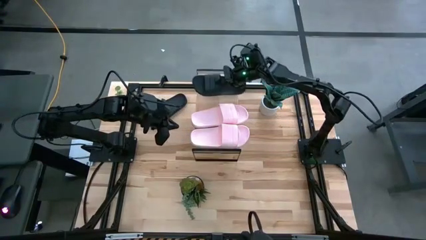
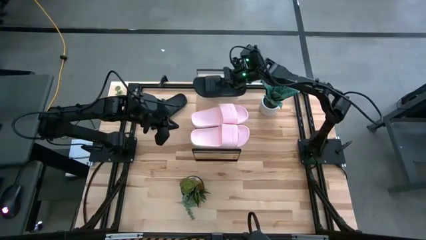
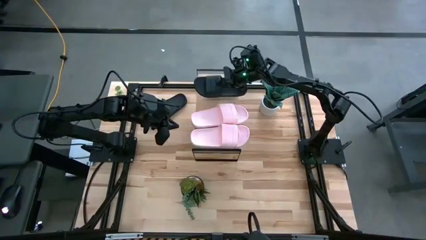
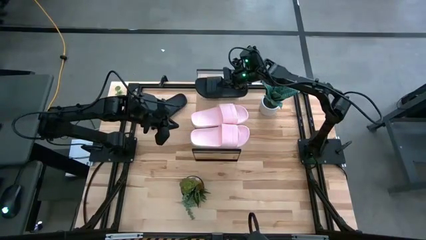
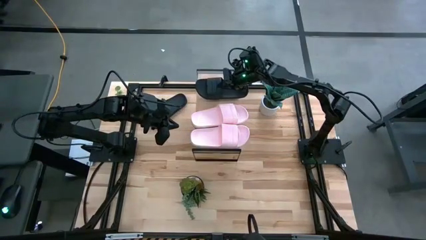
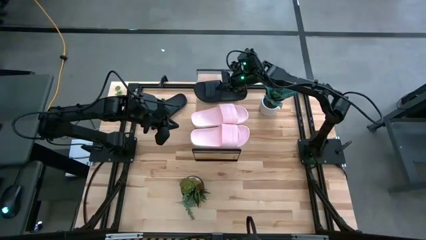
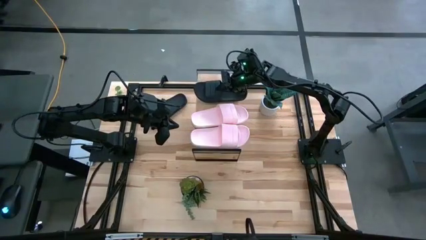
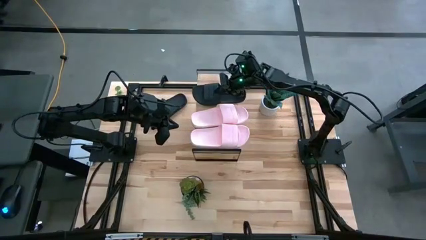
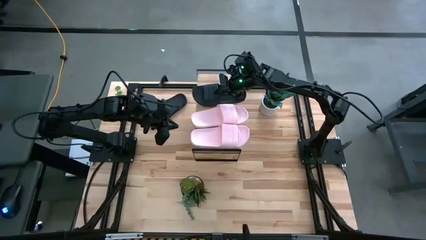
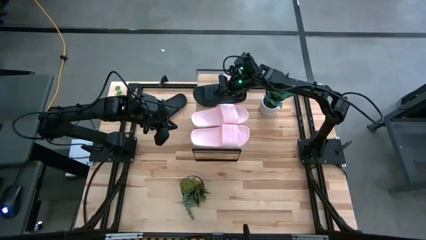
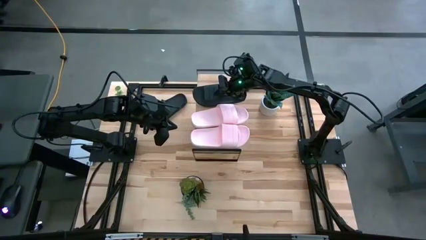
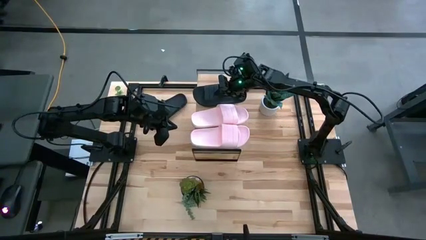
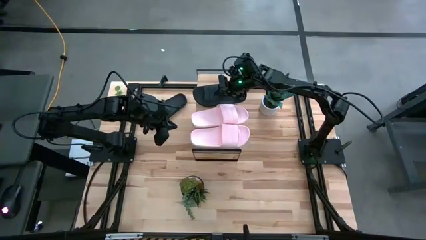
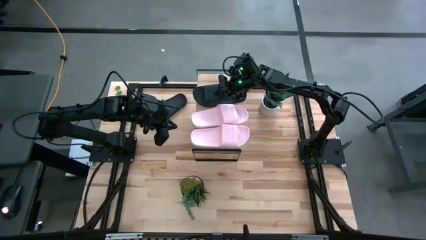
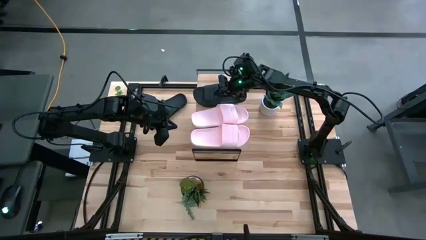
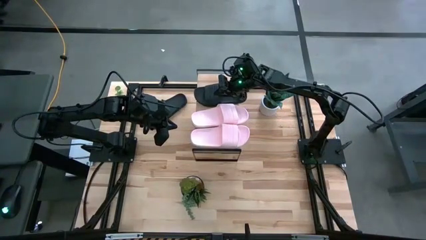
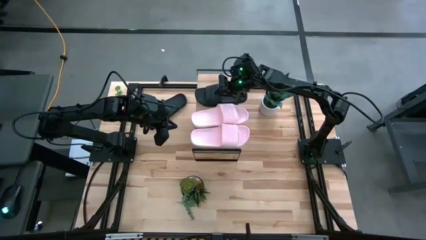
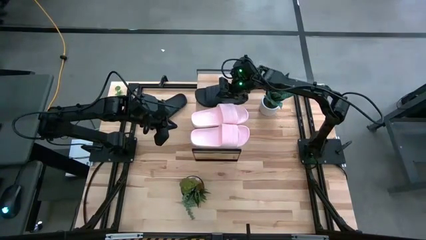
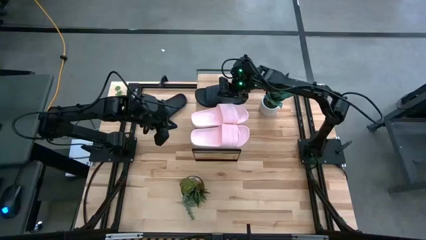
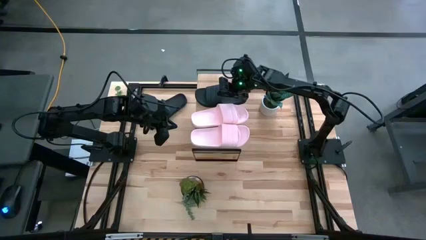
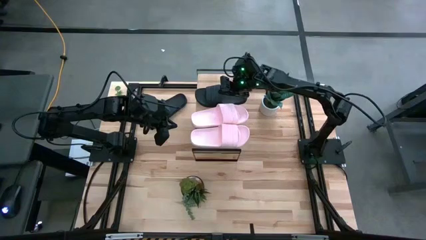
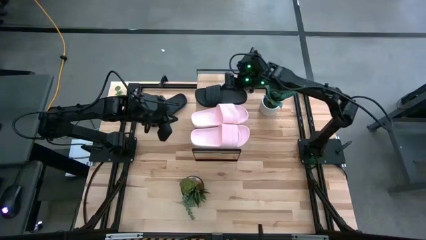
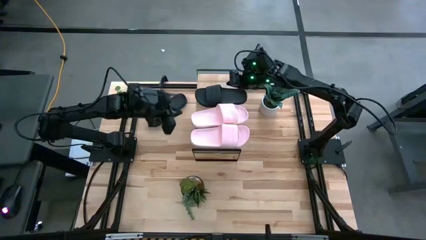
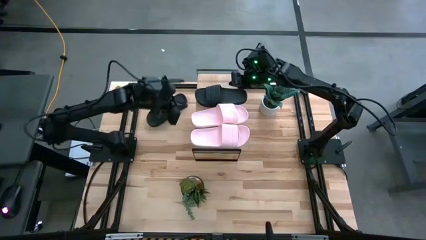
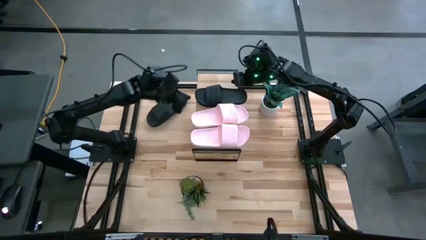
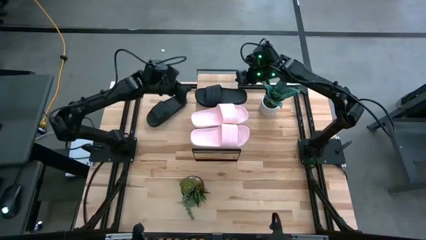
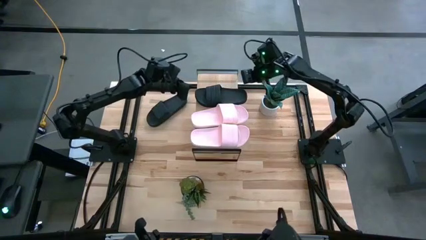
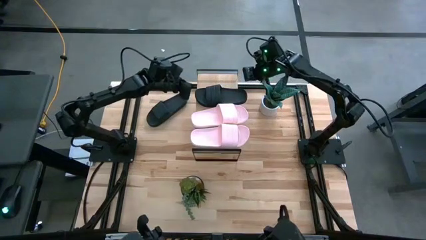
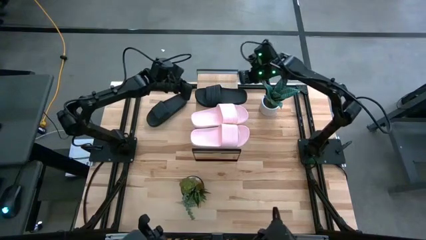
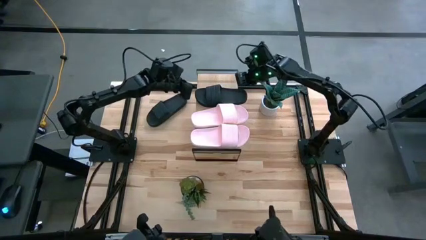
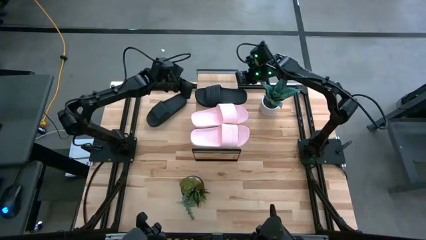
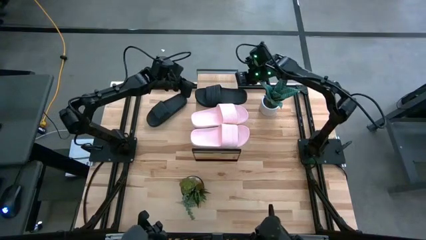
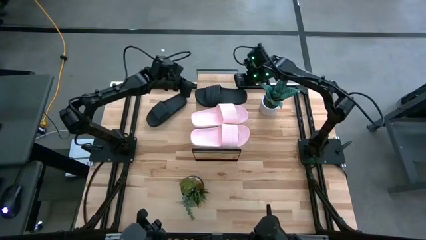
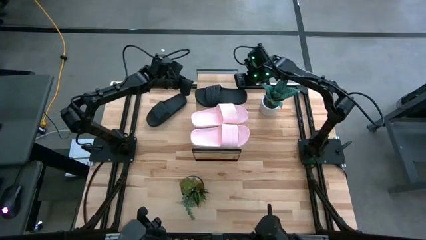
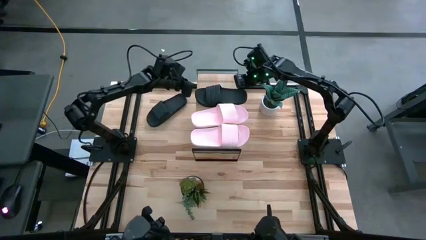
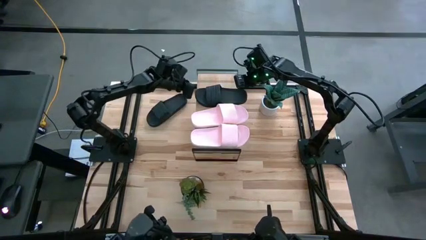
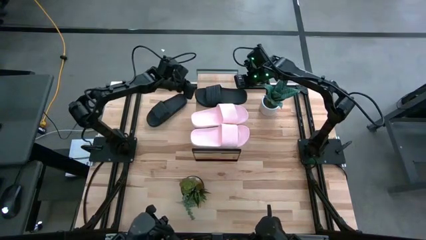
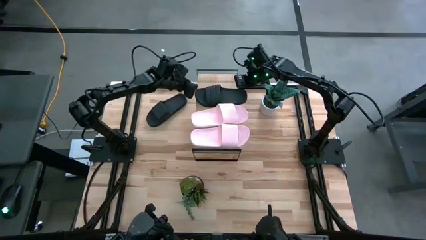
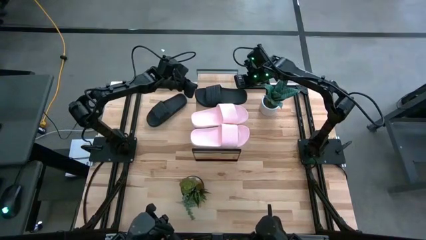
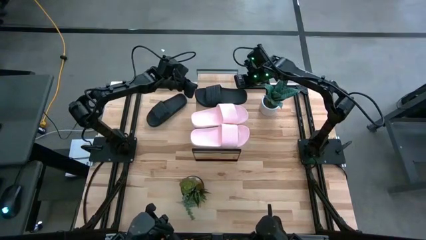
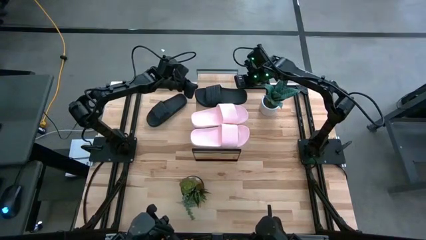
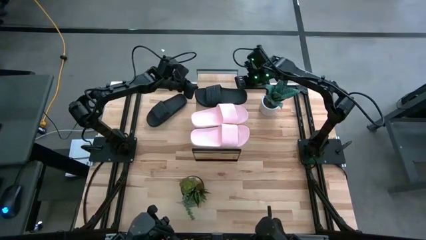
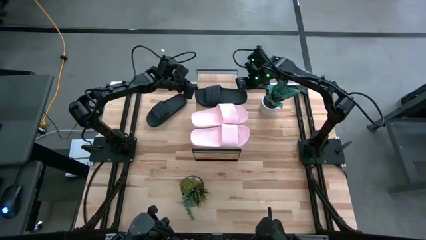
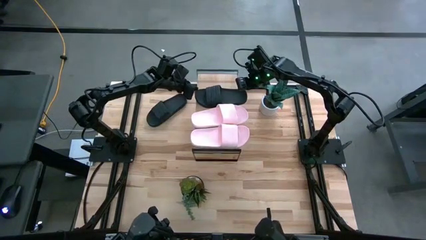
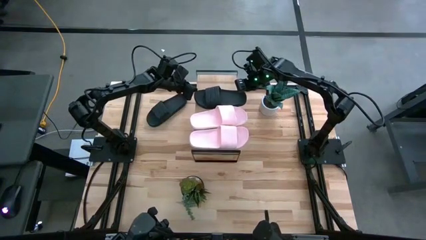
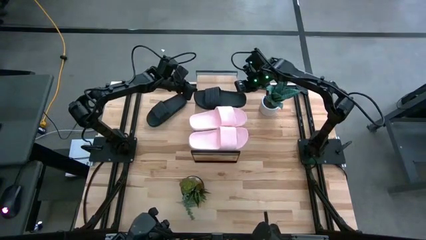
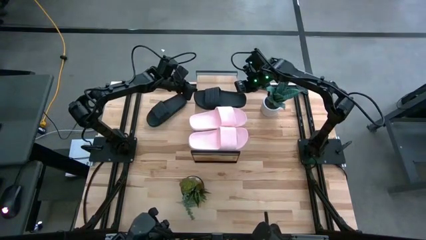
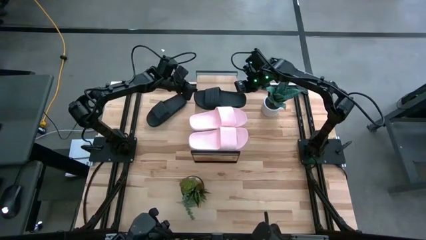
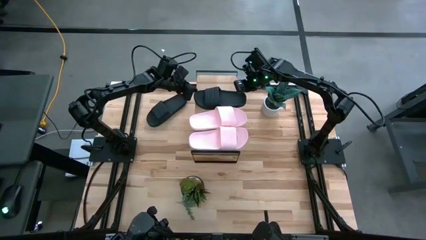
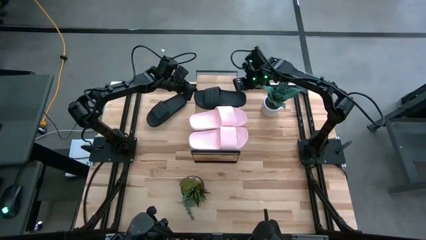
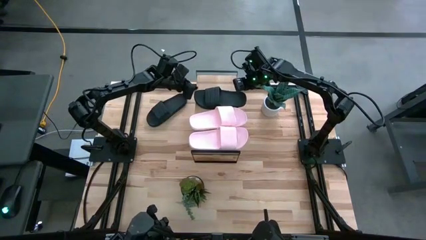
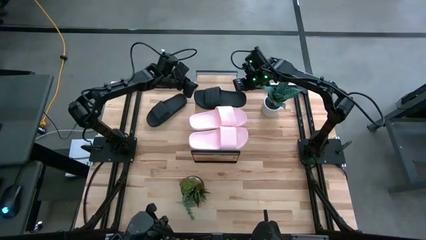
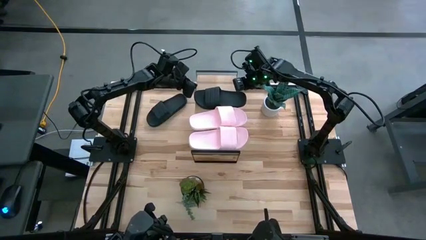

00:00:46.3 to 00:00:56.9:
Task: Pick and place slides into the shelf
Put the bottom black slide on the shelf

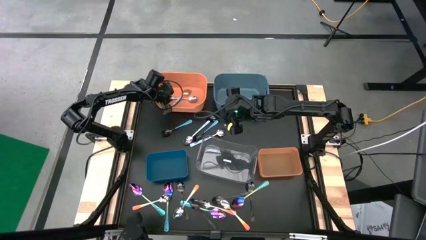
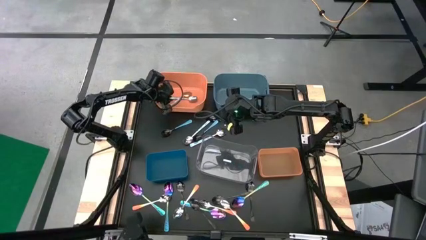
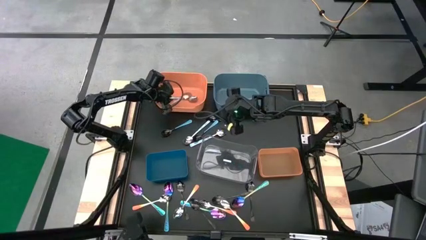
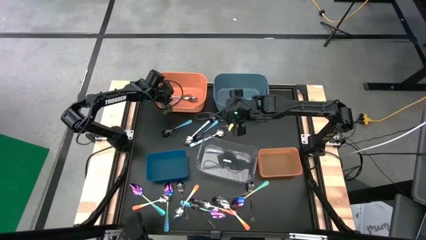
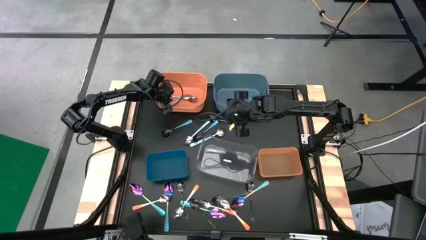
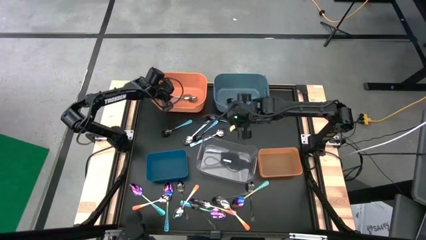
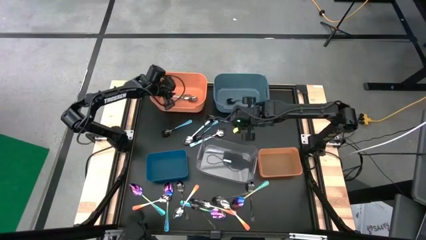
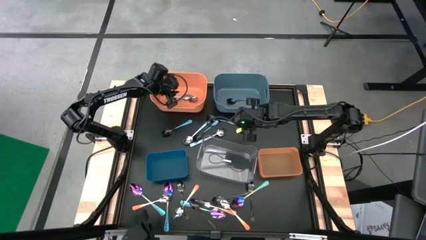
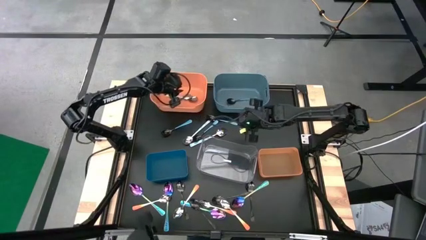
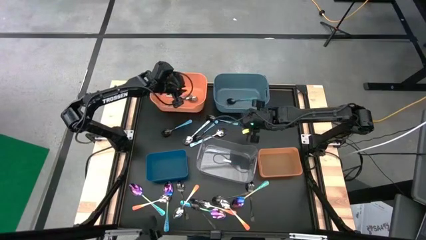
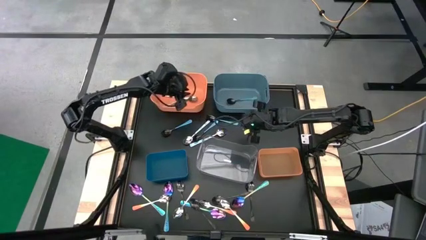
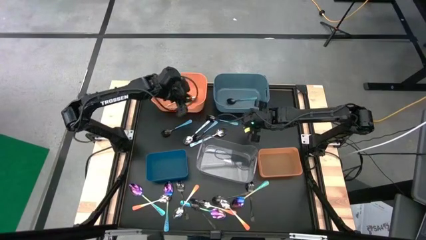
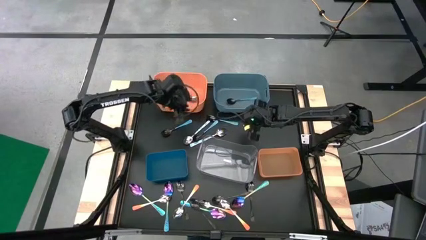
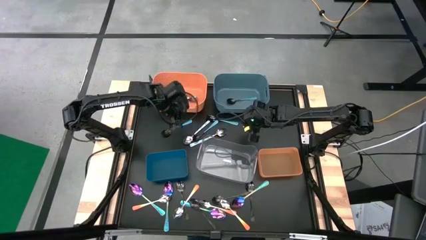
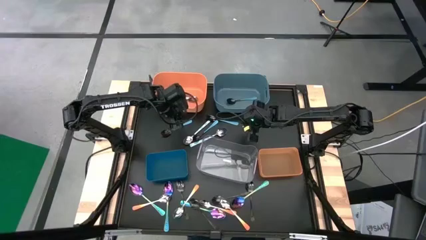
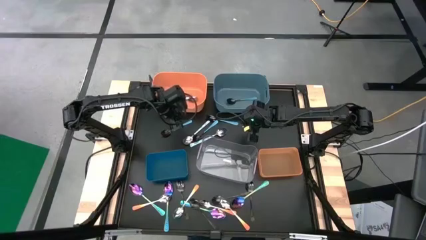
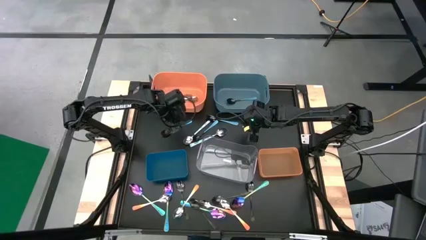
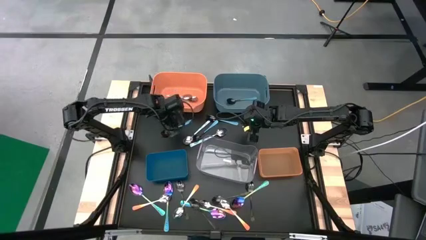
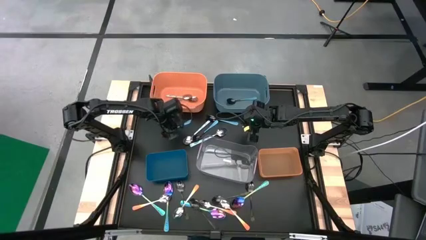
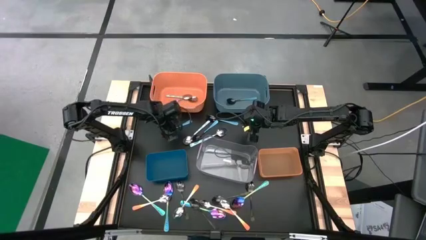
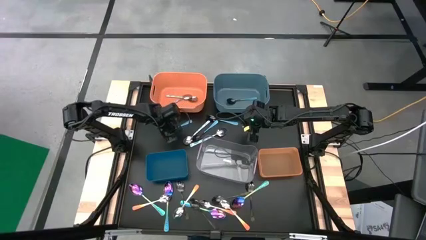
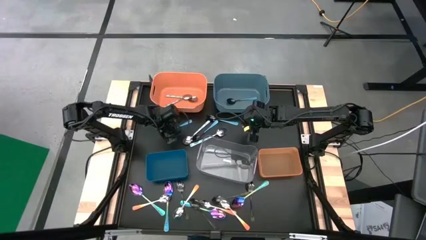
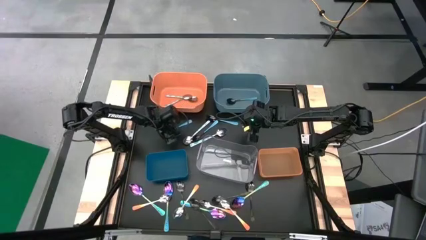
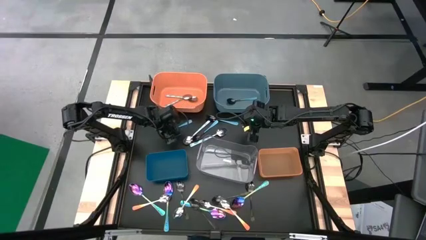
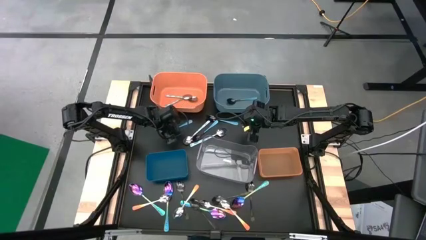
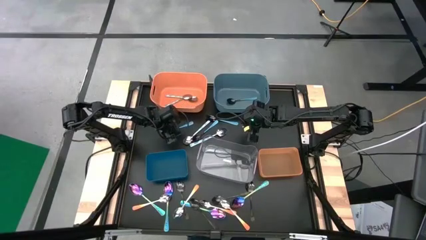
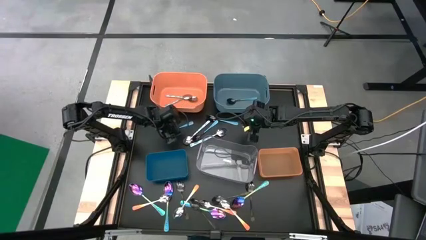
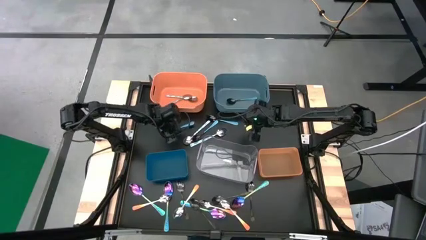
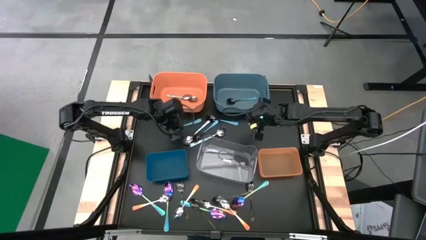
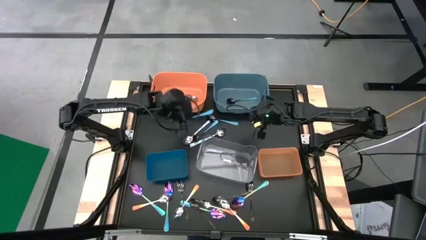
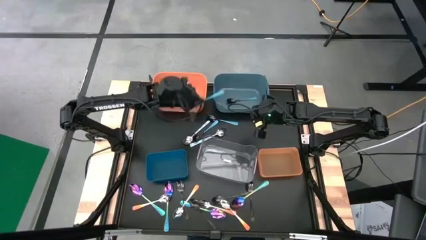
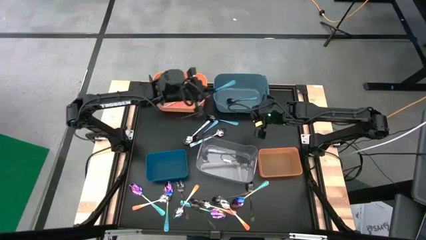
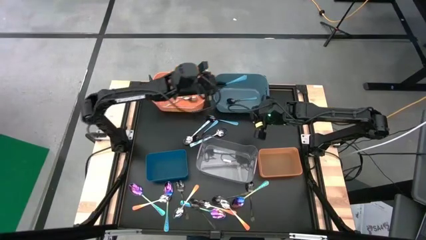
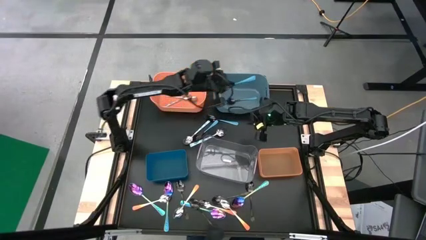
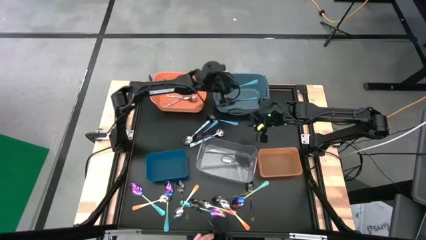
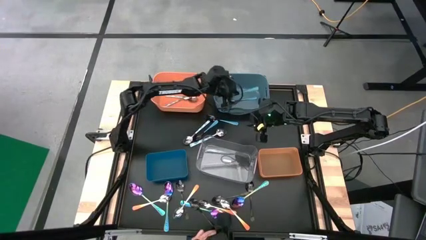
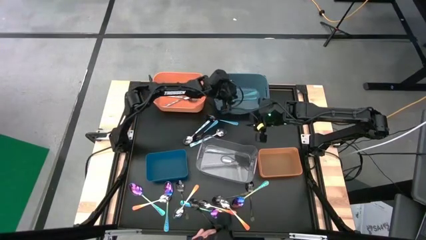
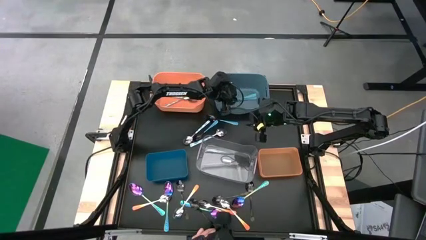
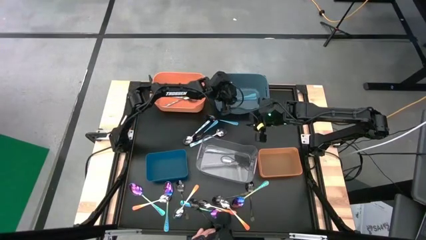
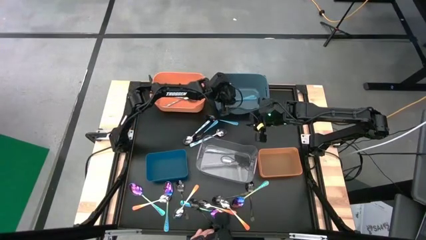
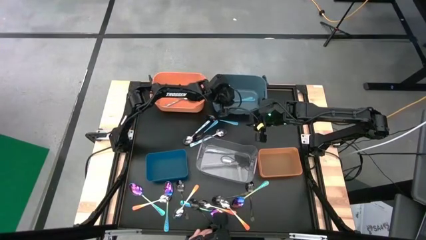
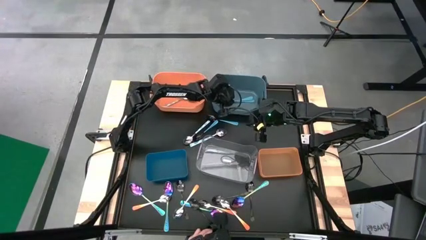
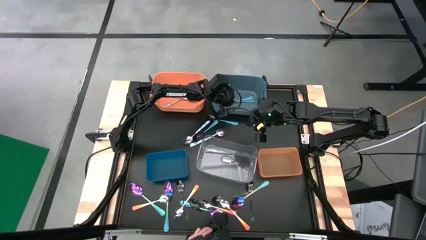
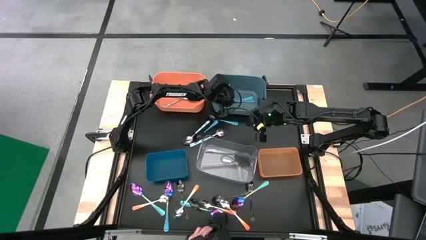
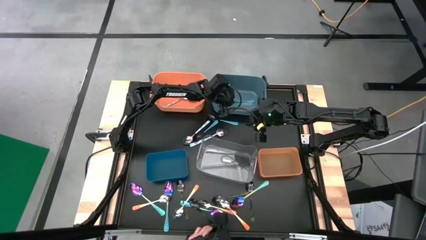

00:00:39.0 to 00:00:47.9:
Task: Sort silverware by color (type)
Put the blue spoon into the light blue bin
